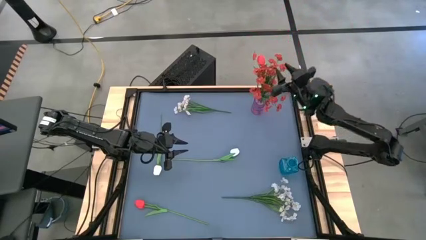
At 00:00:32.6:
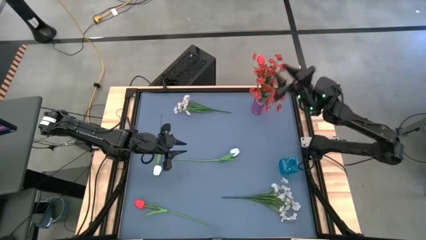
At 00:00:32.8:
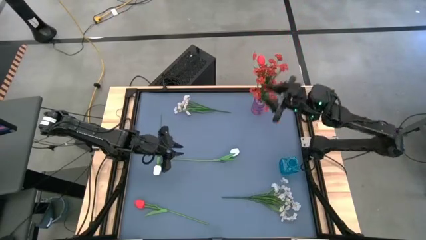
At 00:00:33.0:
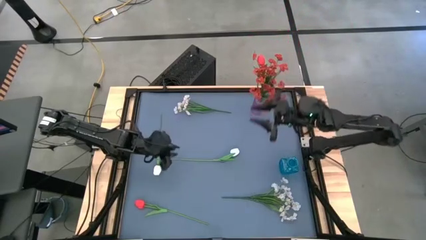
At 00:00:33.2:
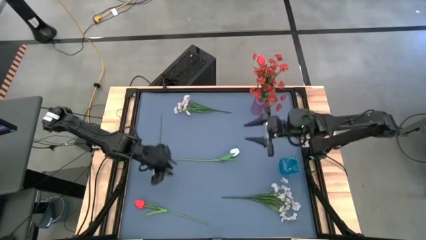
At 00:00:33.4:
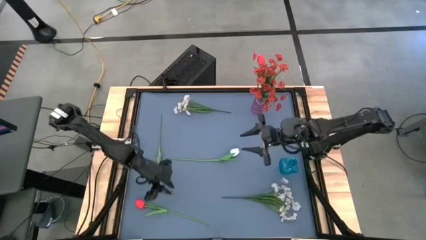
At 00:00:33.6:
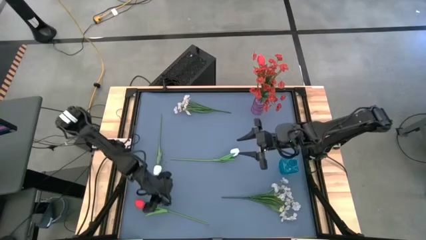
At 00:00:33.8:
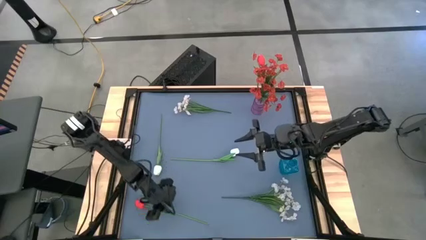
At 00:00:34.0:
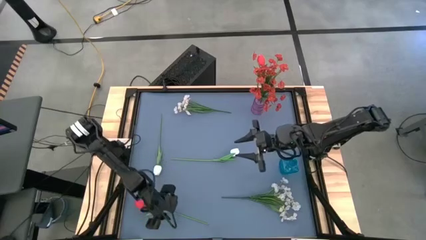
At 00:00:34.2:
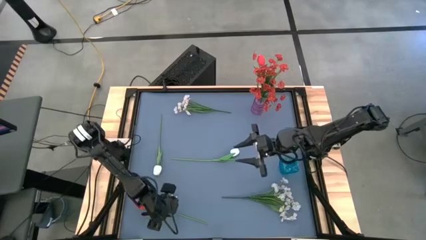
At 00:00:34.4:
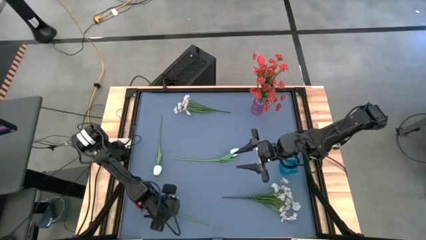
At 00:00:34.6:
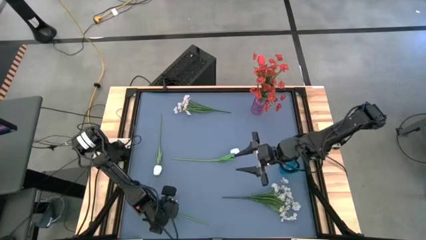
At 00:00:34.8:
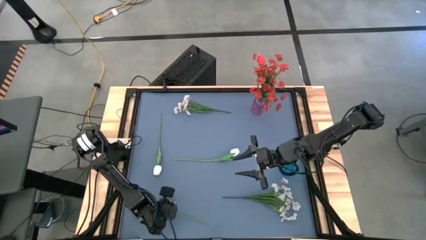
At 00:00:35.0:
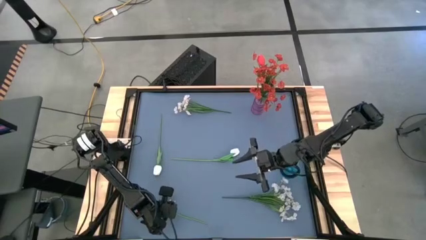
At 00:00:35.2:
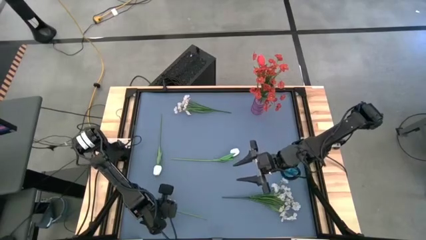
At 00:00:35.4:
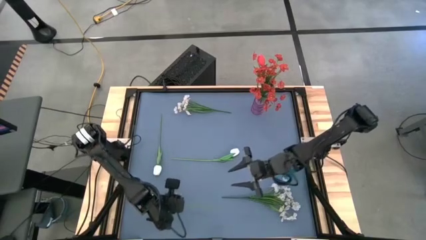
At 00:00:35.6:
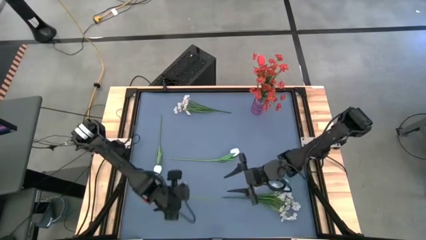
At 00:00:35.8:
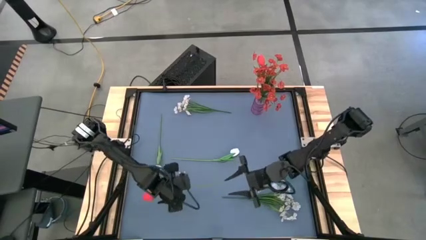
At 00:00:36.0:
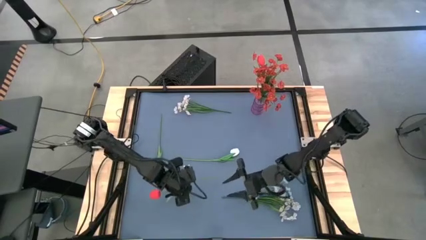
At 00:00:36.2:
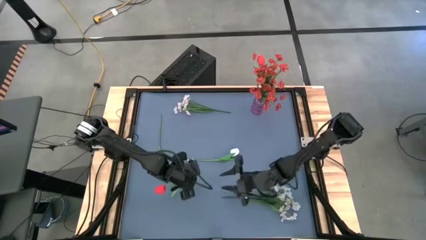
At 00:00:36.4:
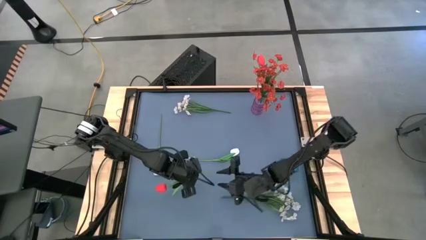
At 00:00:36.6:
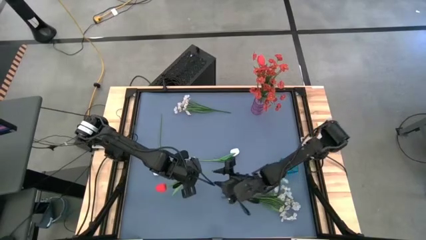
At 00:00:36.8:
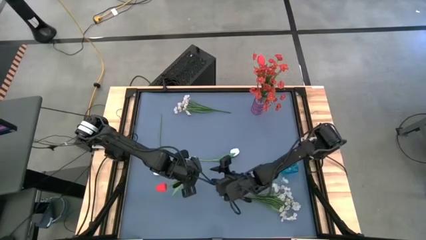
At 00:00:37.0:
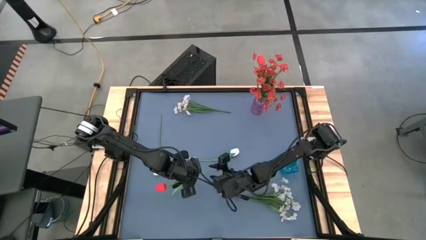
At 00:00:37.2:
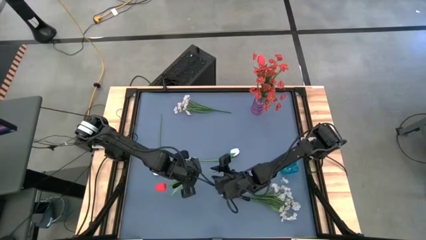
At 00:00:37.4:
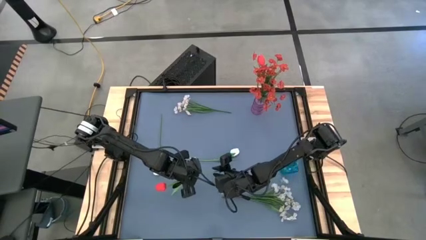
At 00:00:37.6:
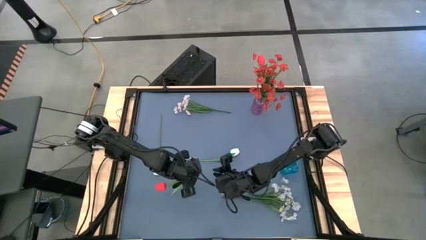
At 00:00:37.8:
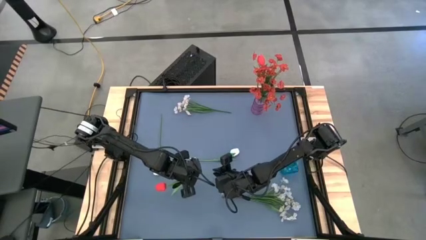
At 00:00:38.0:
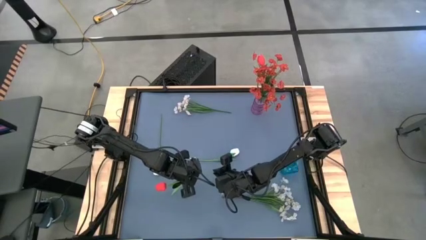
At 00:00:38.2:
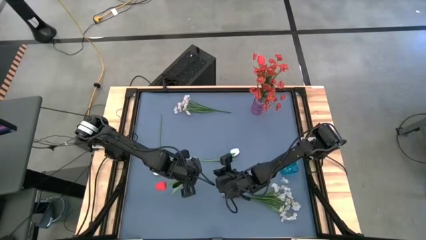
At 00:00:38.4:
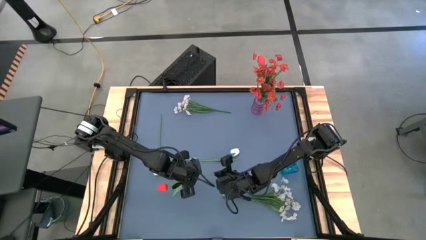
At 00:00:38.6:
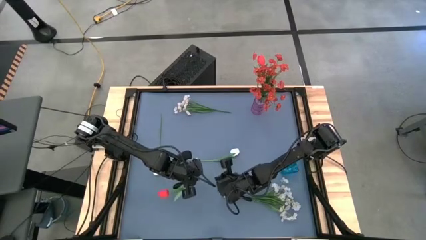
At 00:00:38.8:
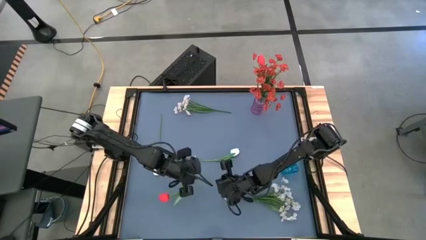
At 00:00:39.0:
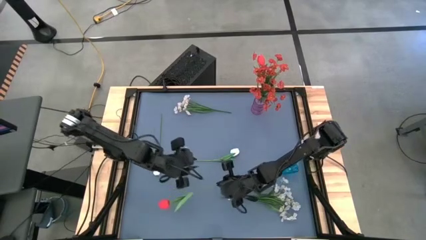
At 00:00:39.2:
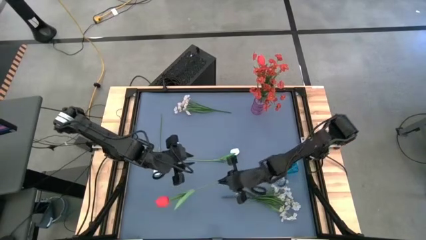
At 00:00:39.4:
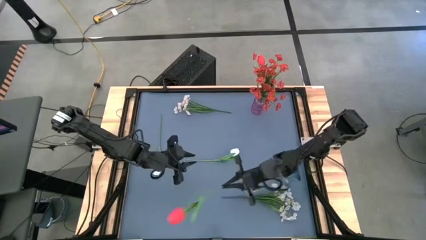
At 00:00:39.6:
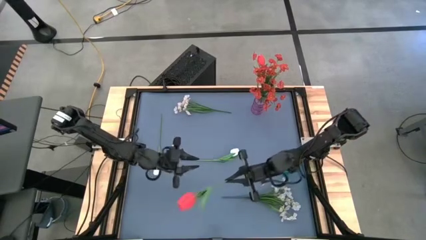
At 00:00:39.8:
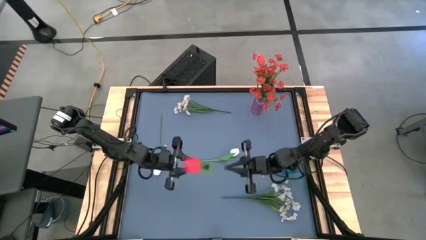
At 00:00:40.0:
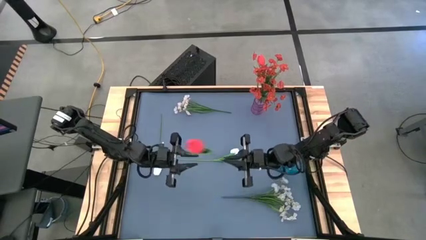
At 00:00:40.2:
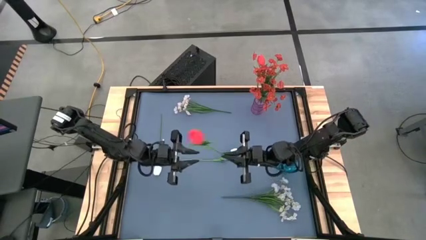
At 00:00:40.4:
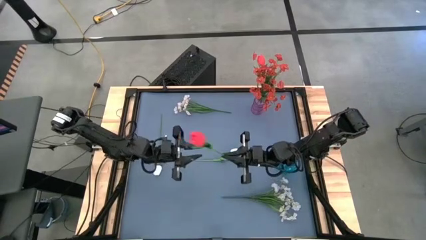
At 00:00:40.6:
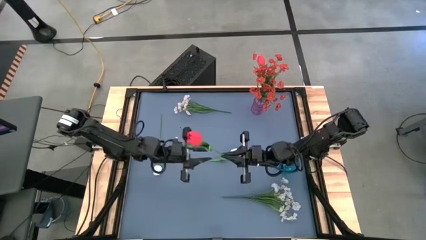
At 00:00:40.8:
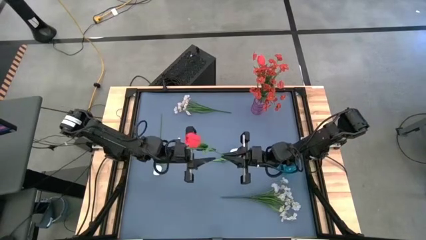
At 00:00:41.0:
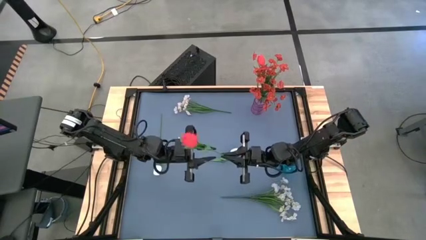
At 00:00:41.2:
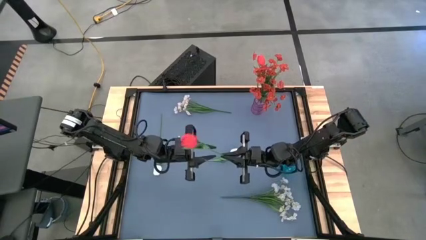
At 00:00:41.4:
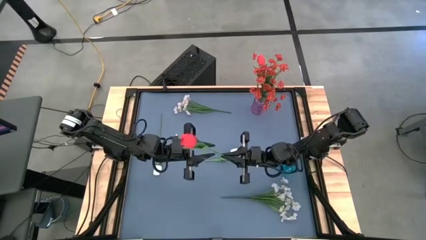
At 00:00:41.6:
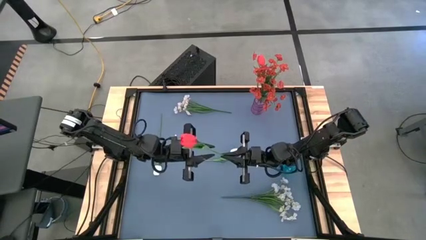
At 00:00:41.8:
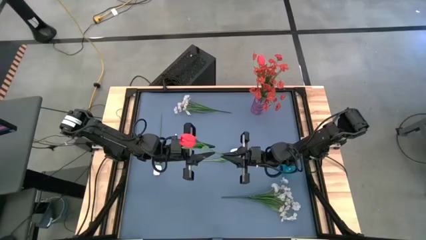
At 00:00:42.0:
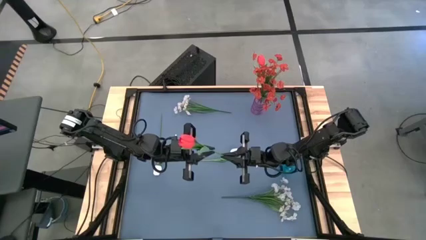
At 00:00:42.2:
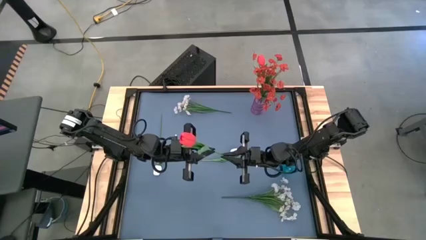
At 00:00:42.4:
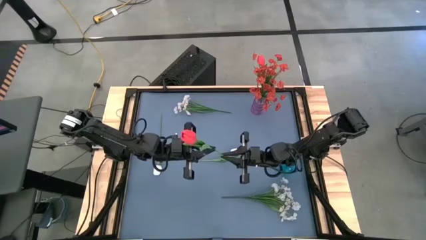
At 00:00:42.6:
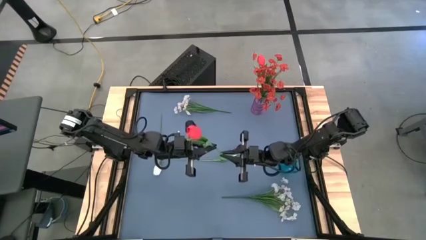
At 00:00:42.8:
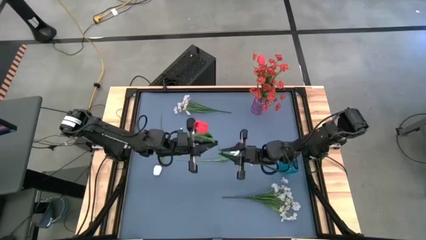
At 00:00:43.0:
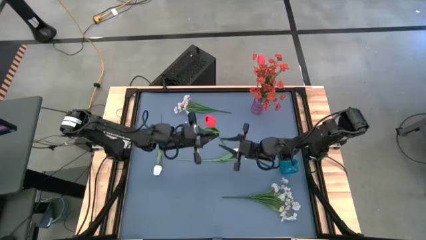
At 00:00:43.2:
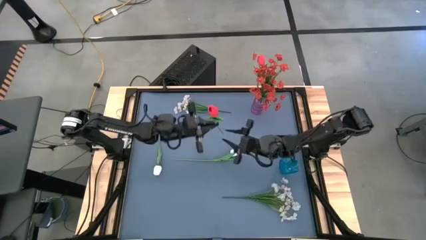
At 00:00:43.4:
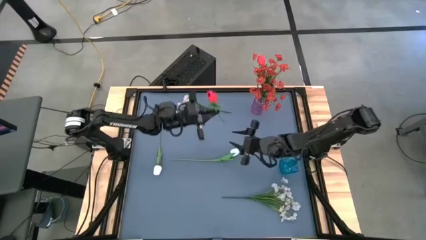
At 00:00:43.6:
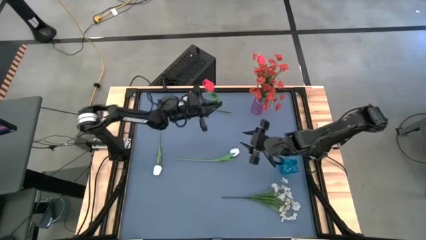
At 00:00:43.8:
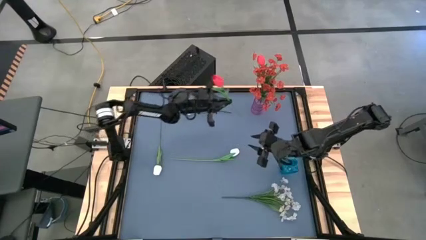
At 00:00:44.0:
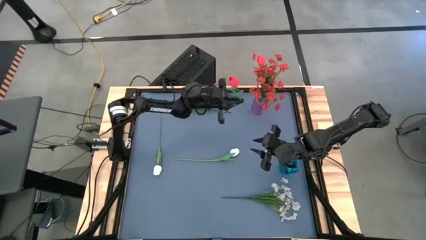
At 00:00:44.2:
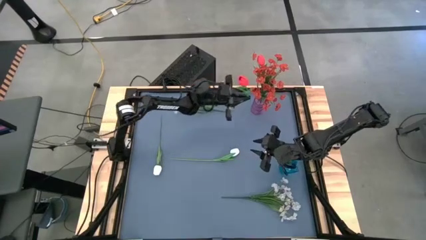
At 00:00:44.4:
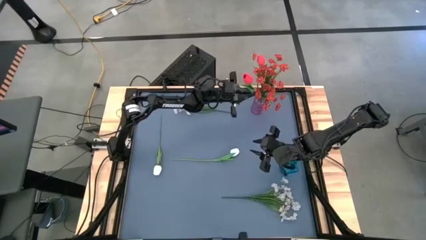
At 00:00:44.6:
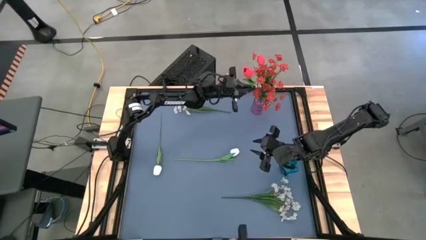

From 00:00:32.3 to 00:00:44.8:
Task: Sort flowers into vase by color
Put the red tulip into the purple vase
